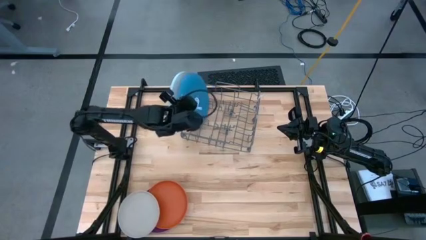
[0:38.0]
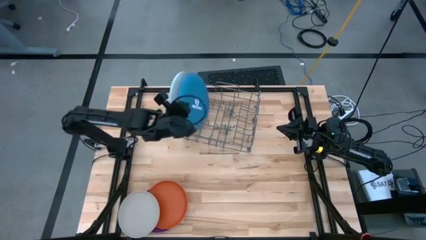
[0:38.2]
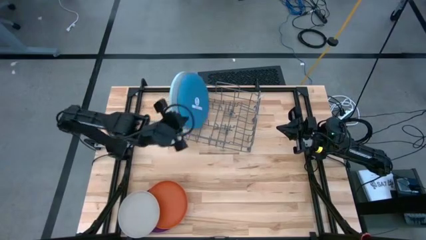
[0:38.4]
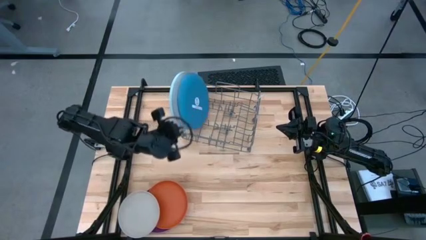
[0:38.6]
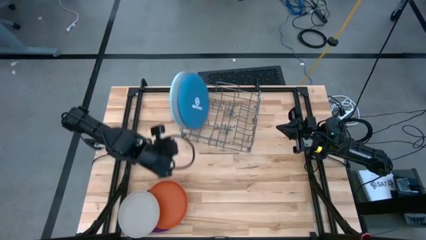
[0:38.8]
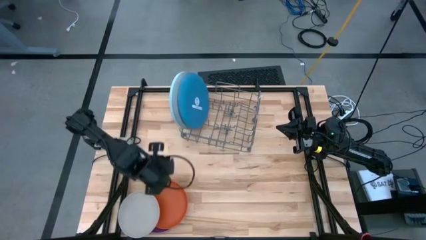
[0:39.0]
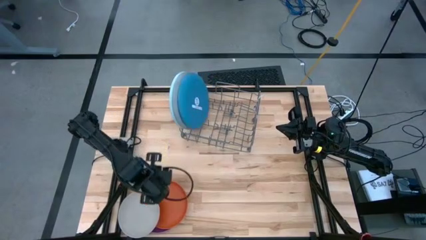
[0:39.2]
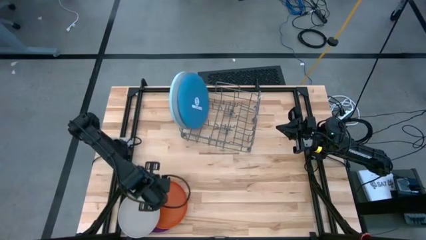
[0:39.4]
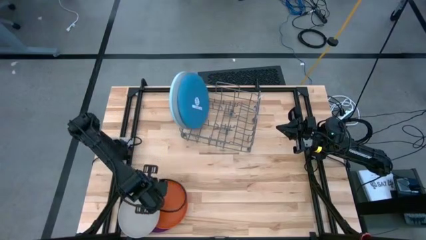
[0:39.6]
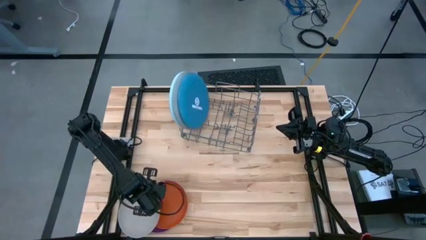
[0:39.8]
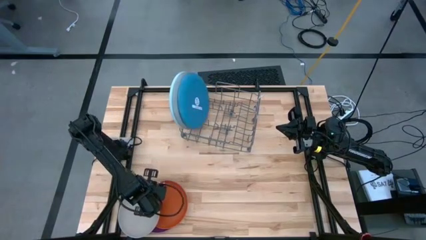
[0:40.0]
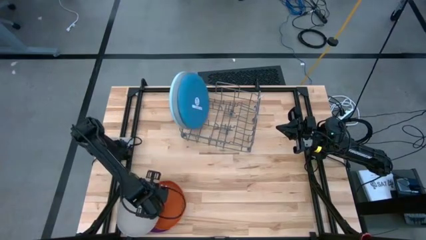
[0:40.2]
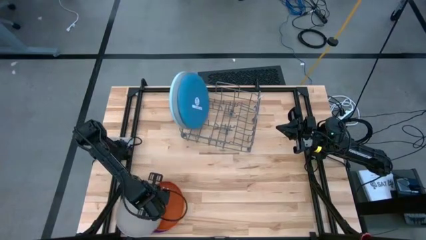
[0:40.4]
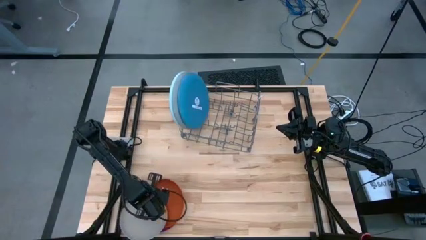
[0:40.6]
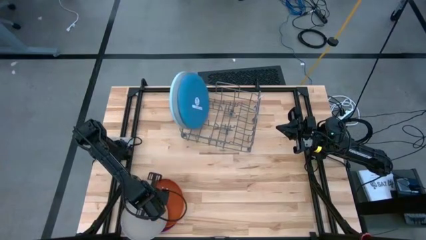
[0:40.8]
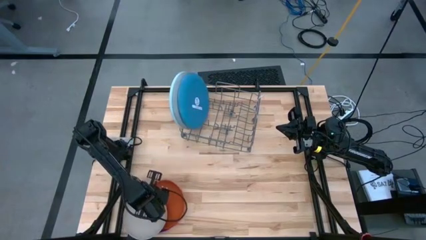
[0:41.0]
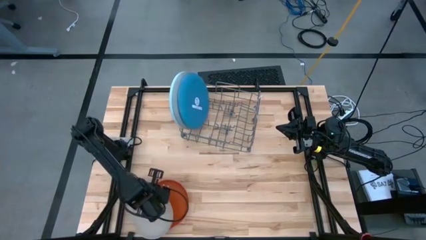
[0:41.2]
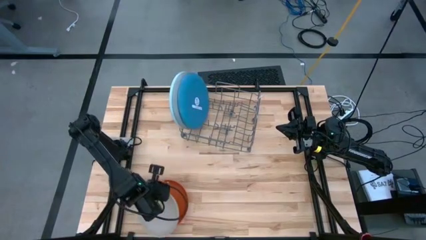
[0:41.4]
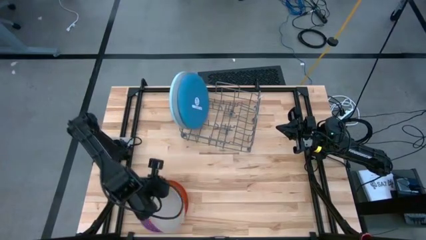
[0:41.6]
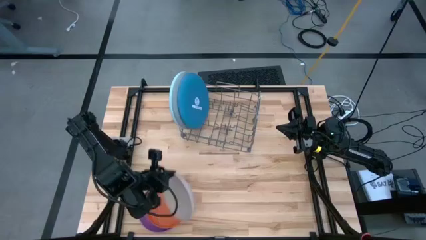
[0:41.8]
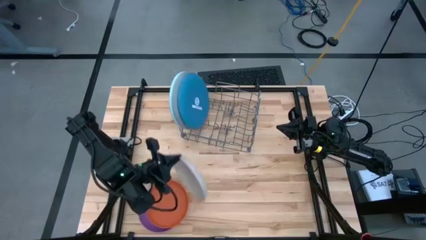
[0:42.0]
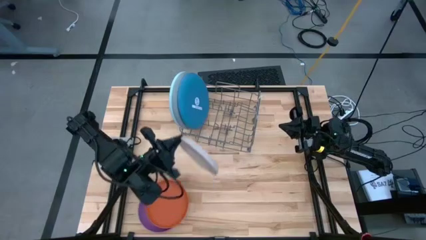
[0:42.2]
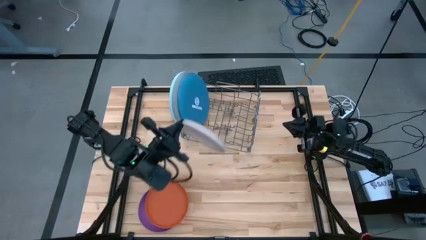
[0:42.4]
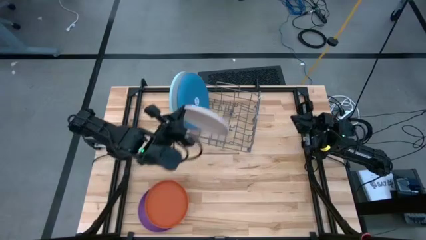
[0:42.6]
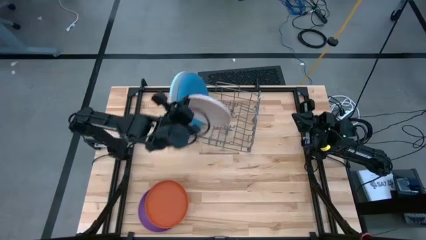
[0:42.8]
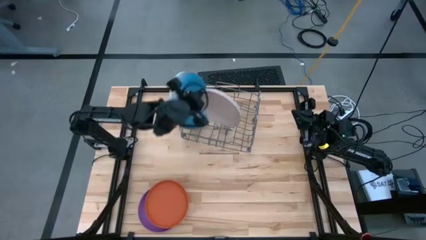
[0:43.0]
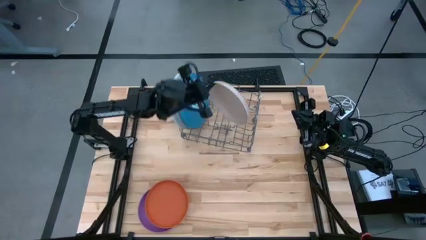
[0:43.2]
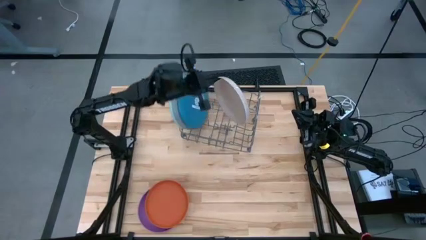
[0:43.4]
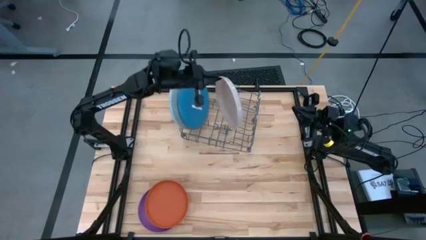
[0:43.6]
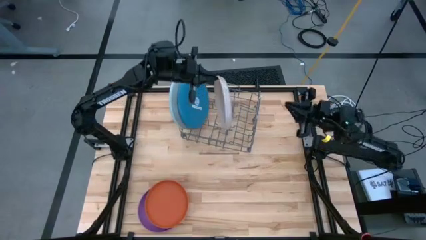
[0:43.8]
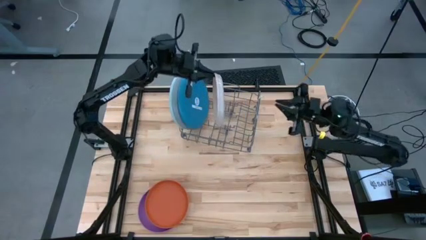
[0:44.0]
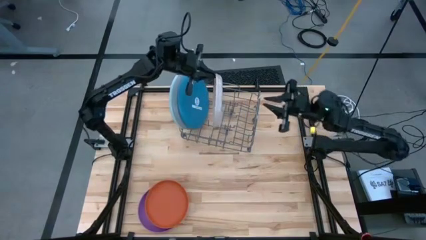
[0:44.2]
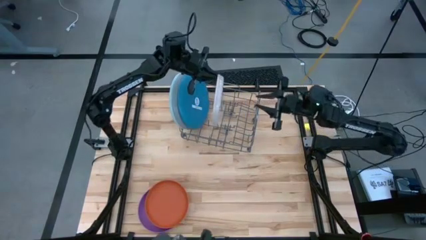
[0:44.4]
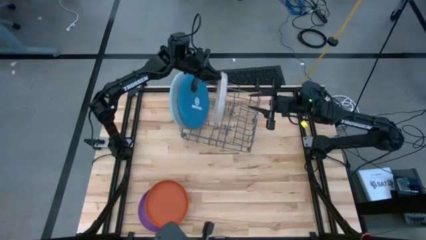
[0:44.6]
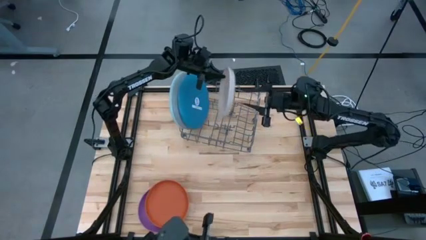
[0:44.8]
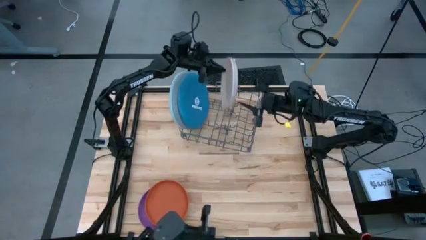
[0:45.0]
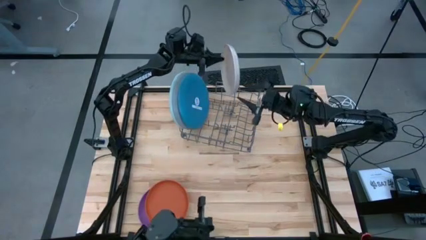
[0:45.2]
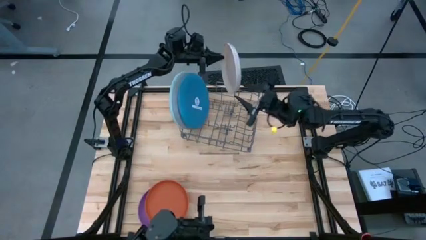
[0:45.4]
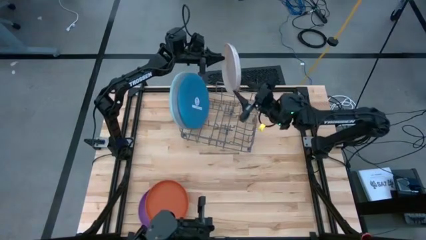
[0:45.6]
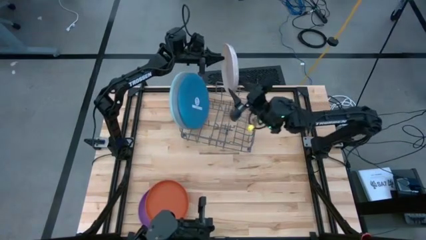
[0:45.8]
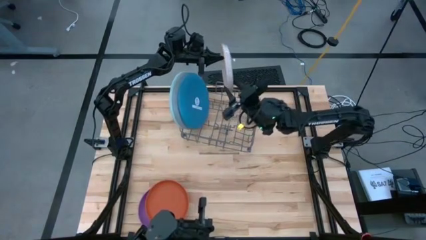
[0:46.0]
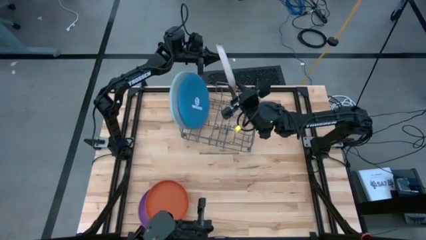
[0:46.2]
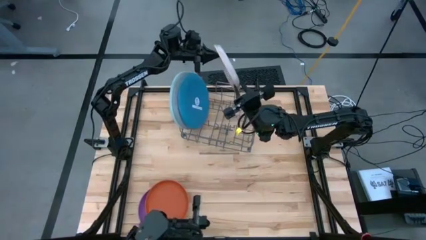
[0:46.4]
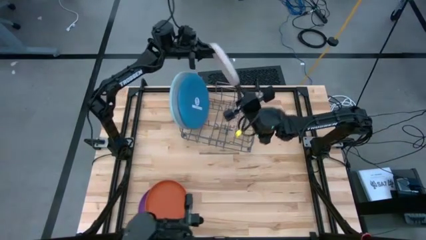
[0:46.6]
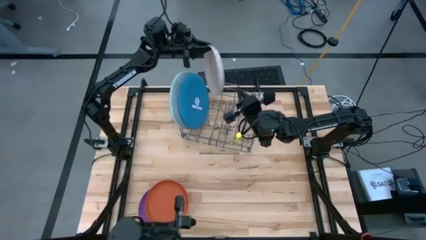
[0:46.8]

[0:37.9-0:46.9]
Task: Sort dishes
Put the white plate into the dish rack
